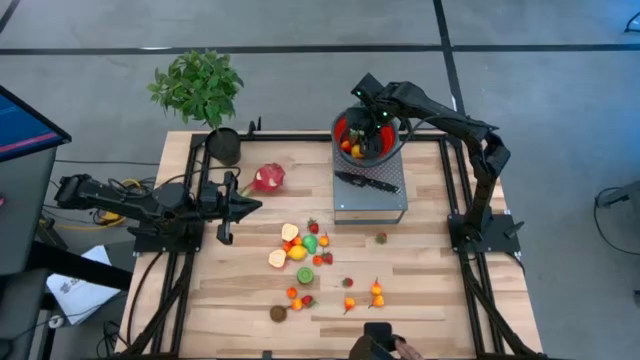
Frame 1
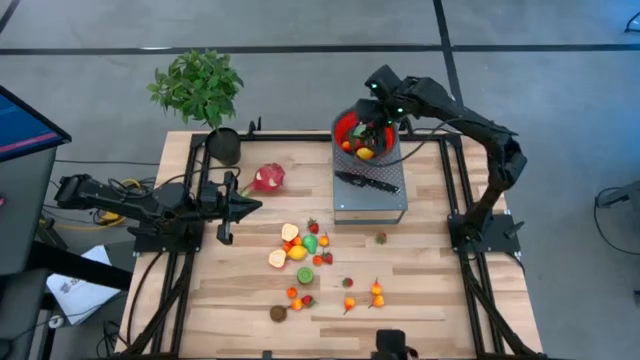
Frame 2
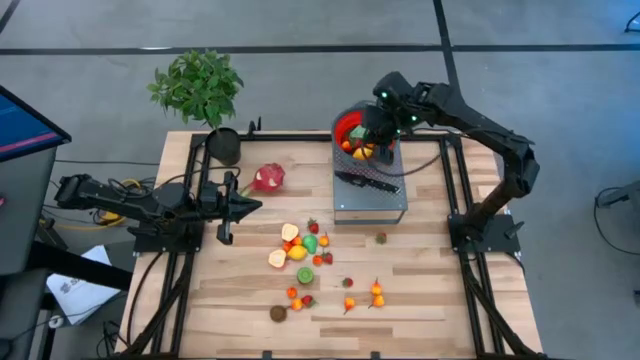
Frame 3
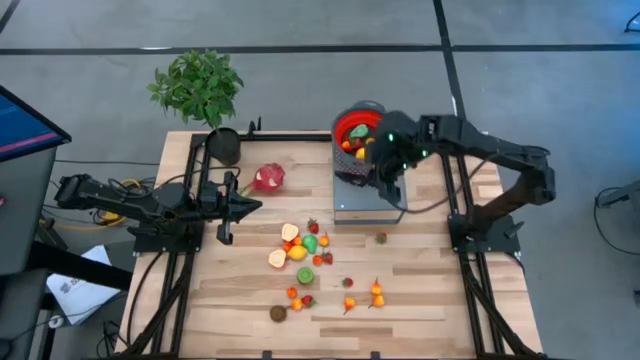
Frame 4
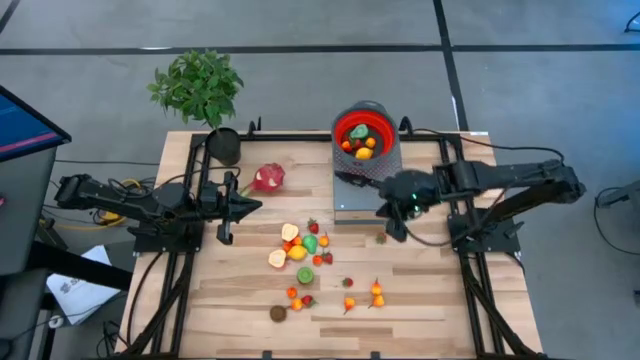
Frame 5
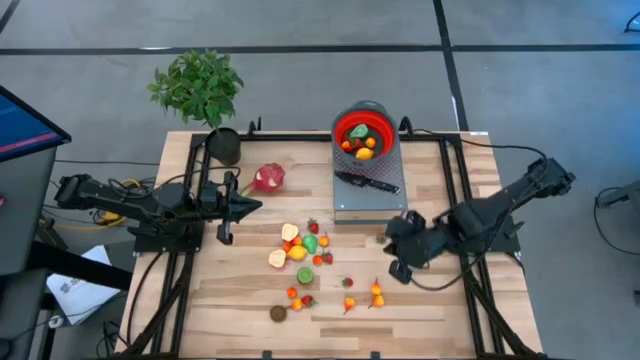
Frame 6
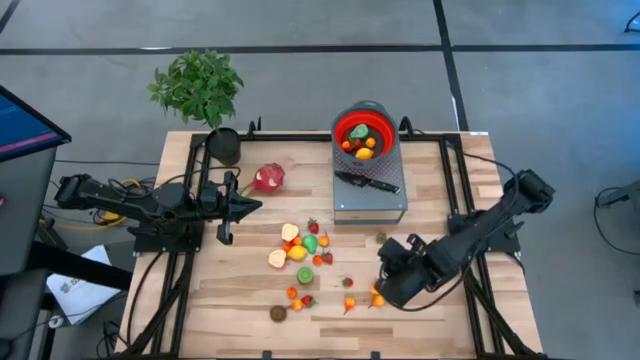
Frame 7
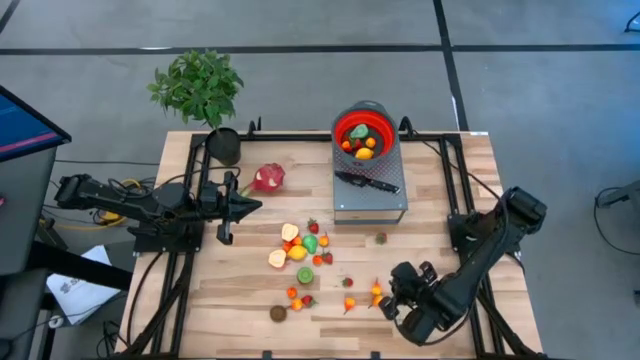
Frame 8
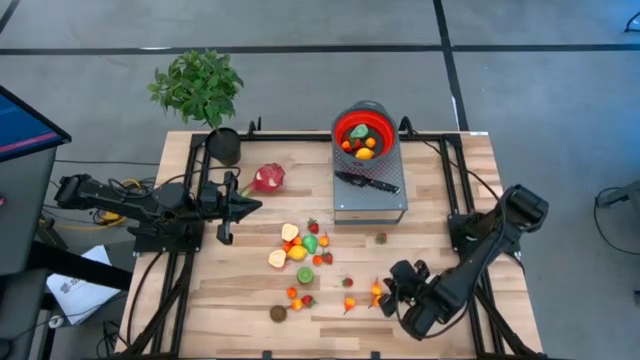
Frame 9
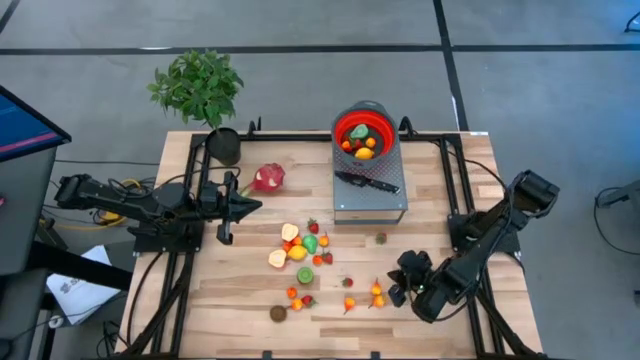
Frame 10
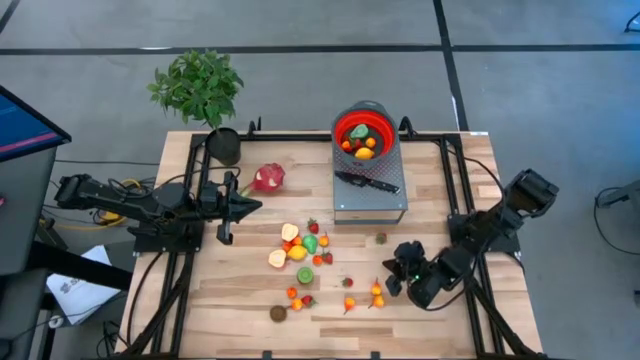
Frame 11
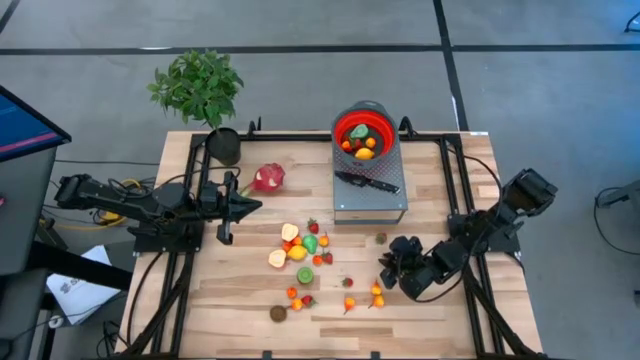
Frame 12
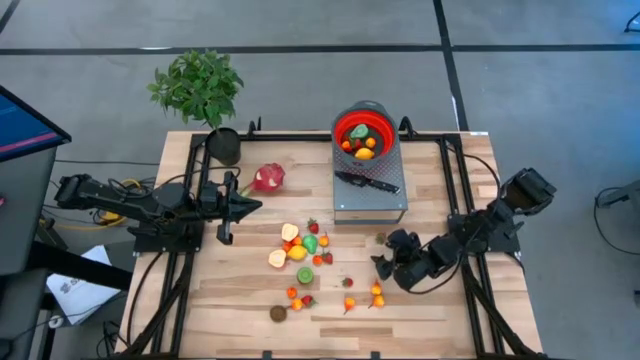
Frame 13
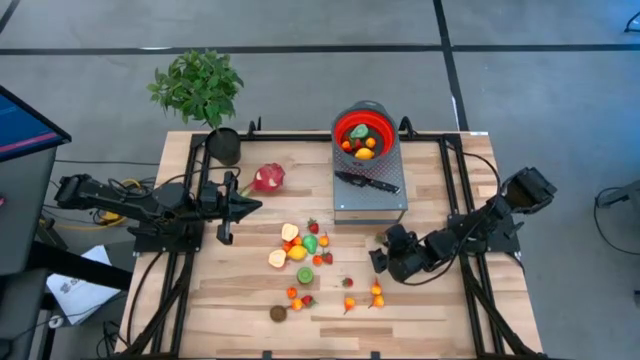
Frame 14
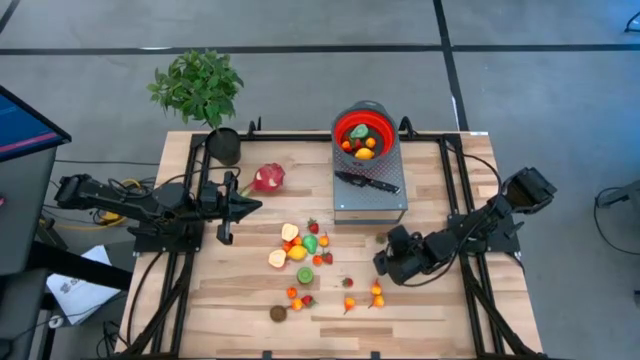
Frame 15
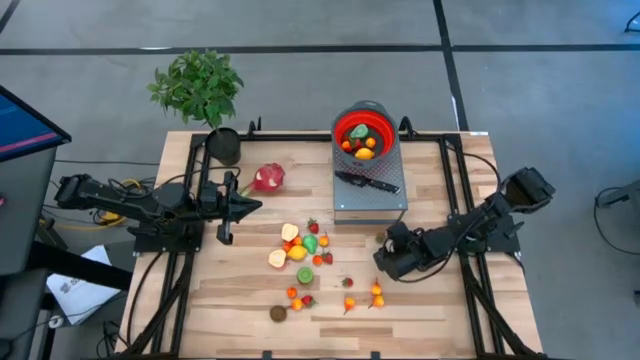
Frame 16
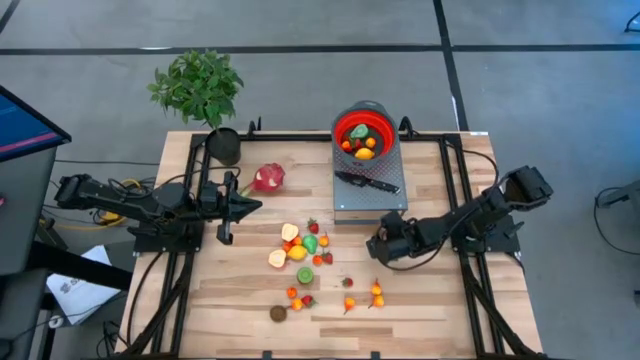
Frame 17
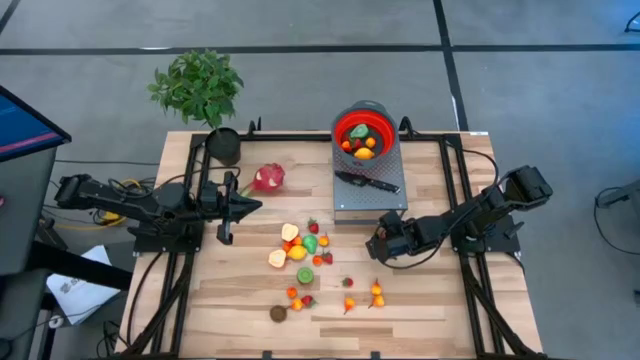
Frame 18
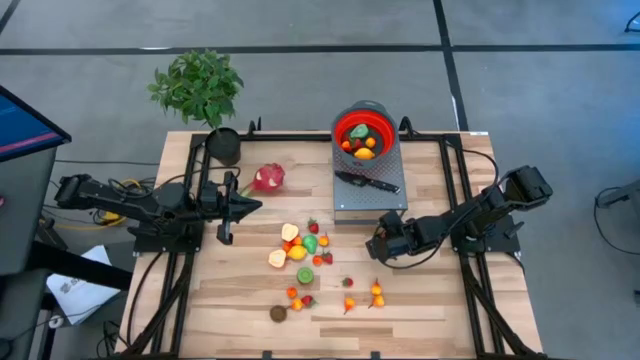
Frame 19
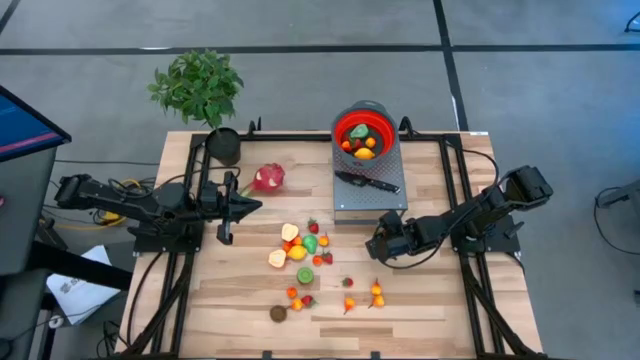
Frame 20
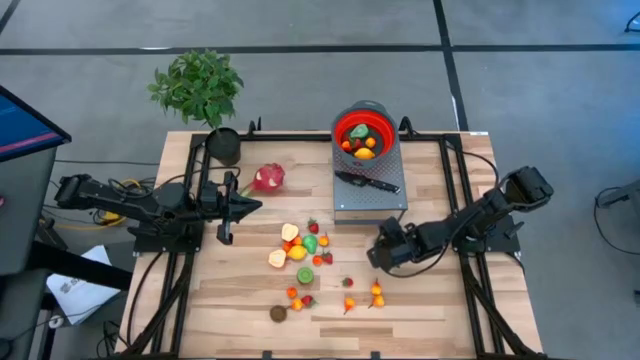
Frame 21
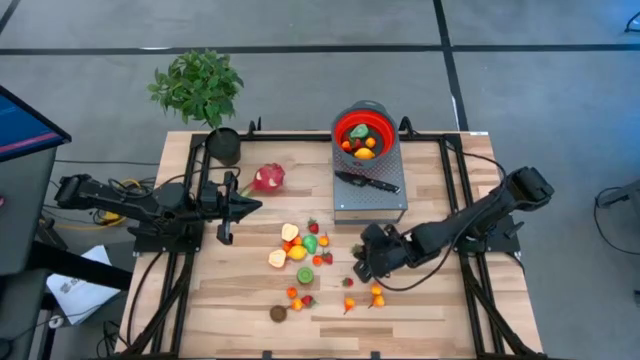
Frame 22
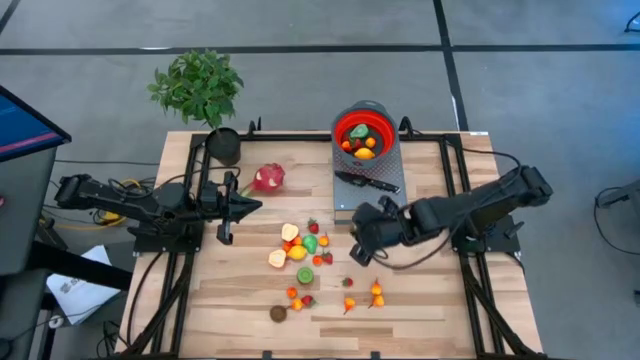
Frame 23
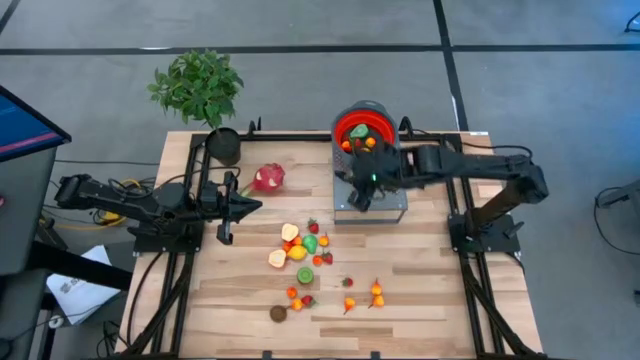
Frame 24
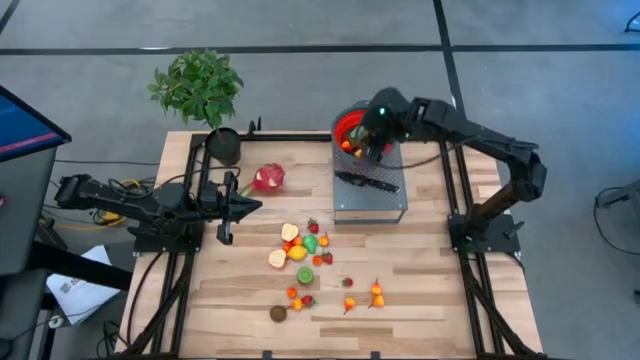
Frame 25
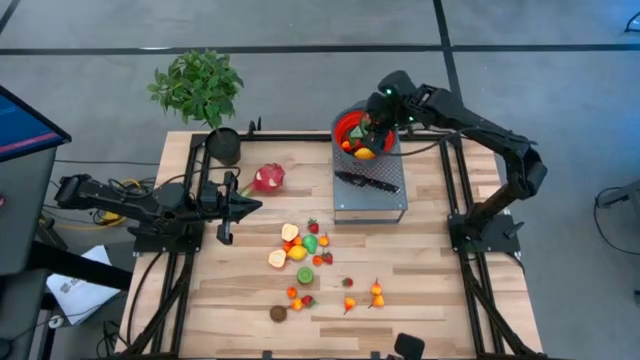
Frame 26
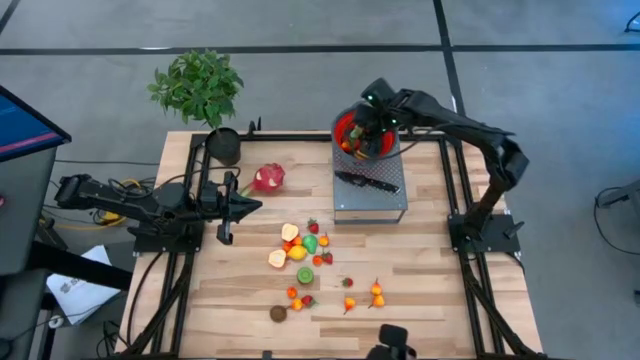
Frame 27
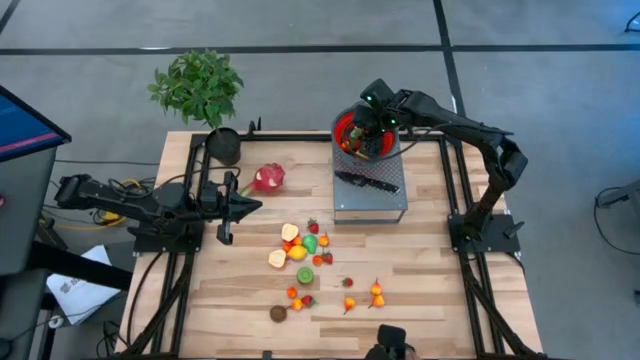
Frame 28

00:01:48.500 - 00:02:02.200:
Task: Pick & Place Fruit
Put the strawberry into the red colander on the shelf

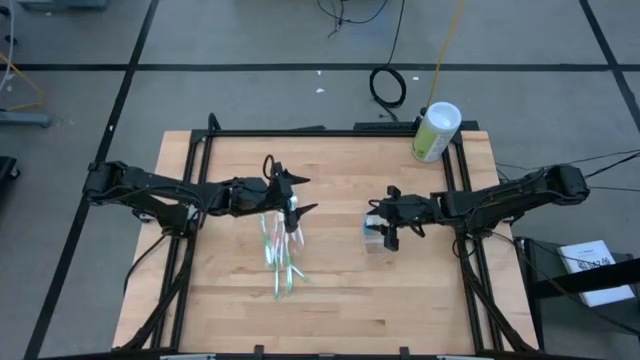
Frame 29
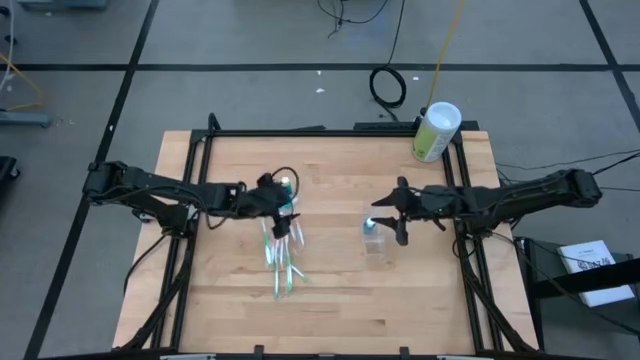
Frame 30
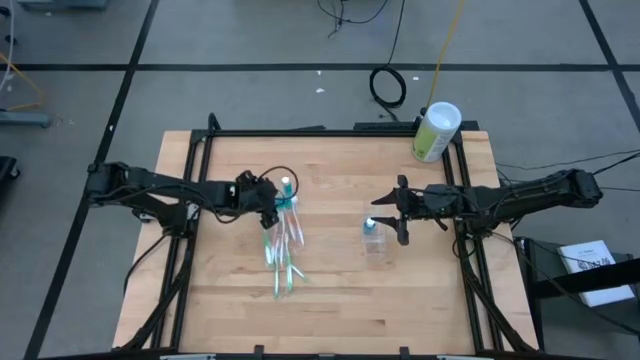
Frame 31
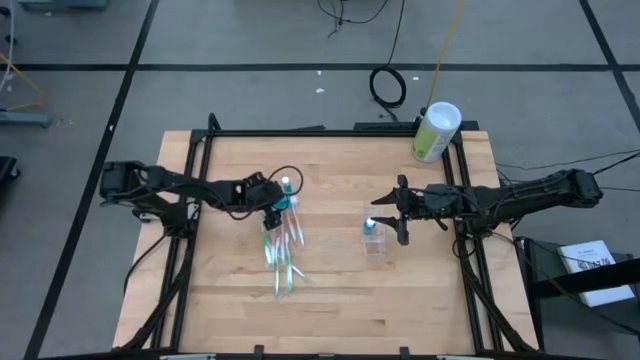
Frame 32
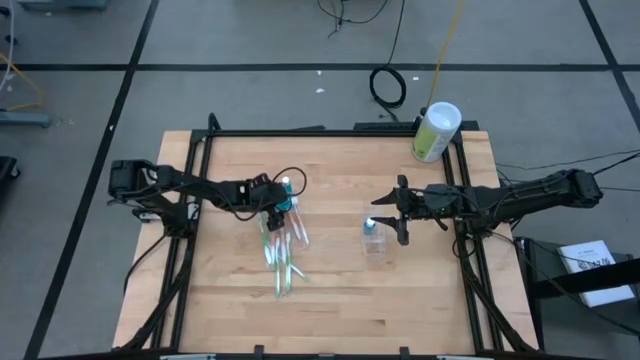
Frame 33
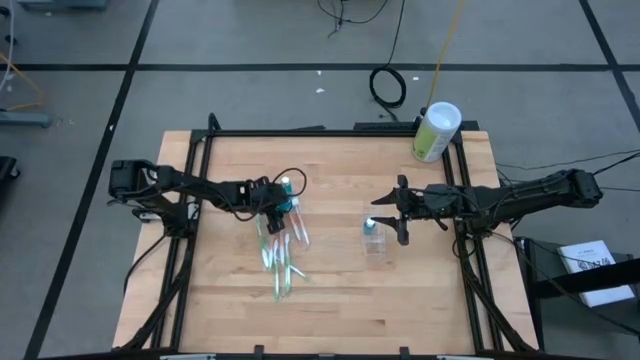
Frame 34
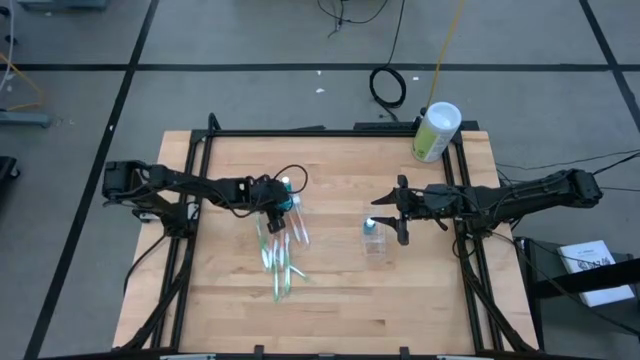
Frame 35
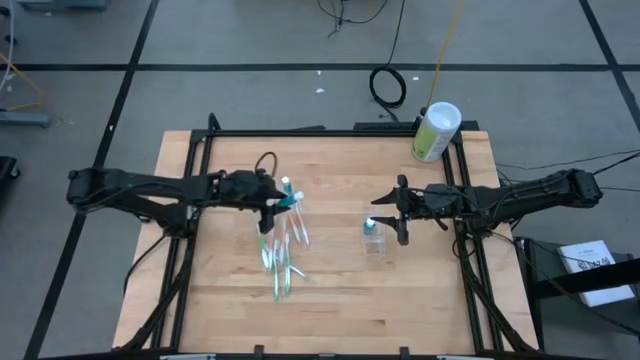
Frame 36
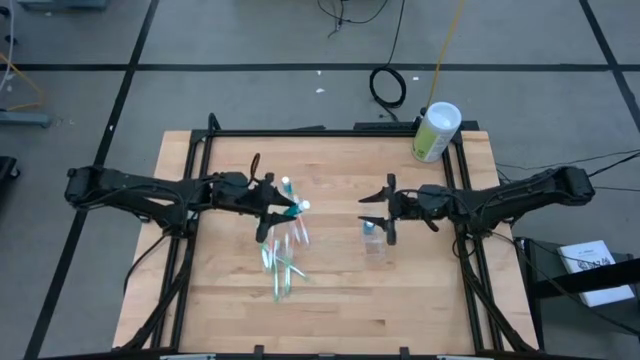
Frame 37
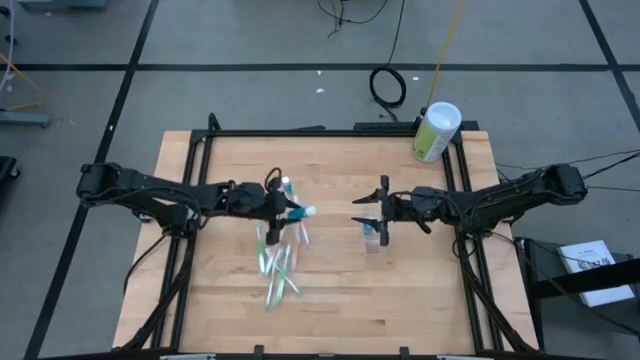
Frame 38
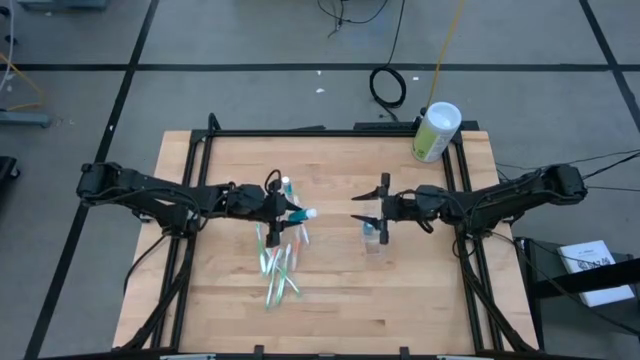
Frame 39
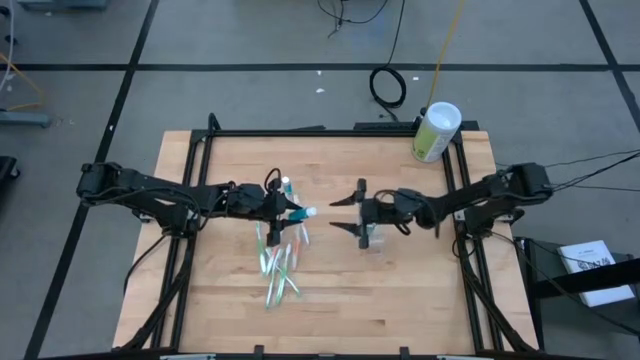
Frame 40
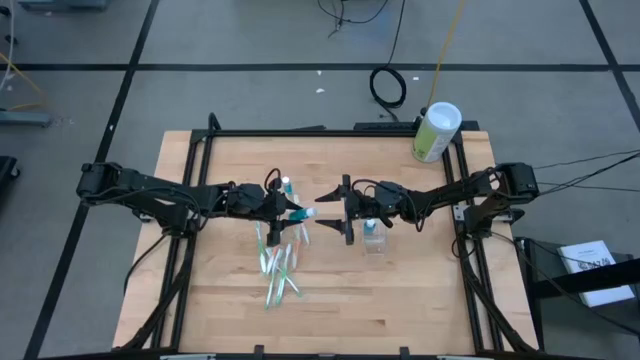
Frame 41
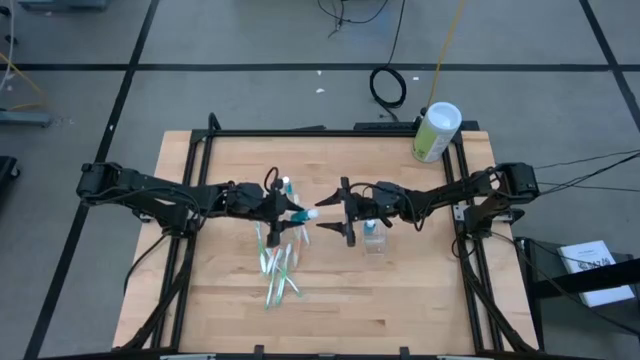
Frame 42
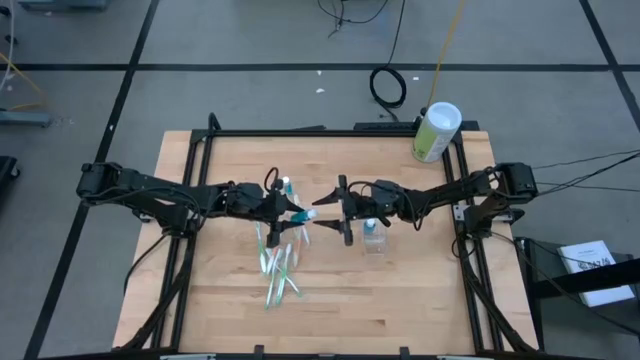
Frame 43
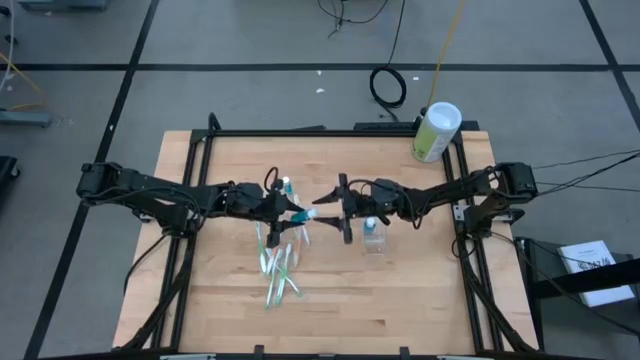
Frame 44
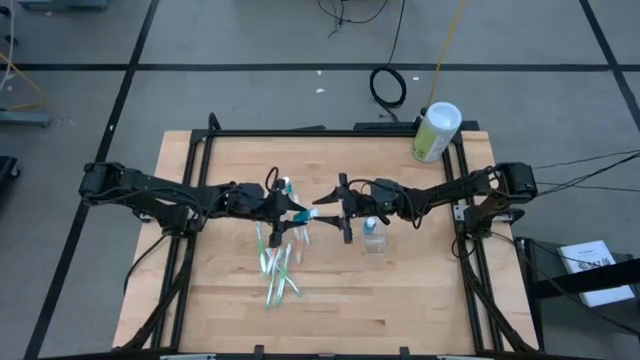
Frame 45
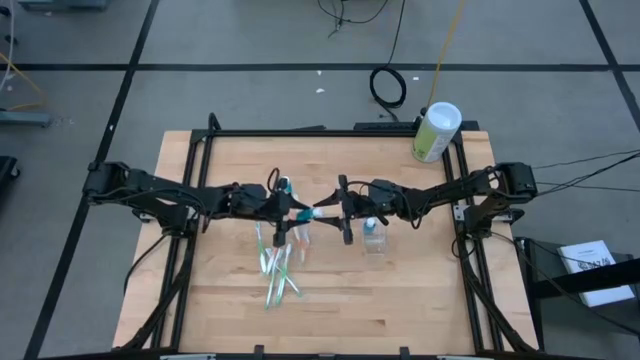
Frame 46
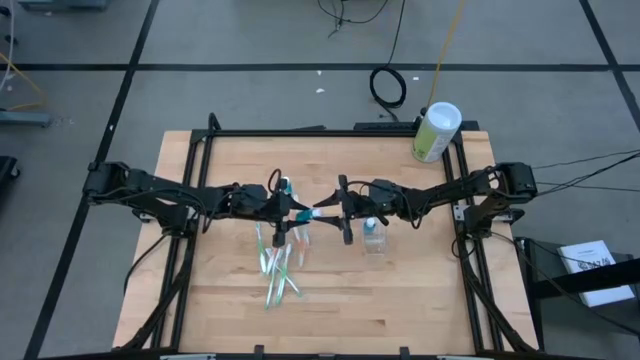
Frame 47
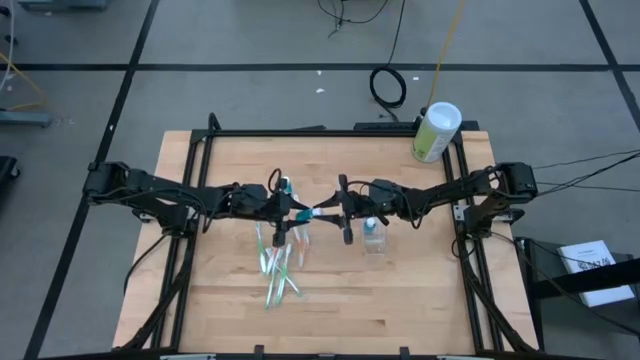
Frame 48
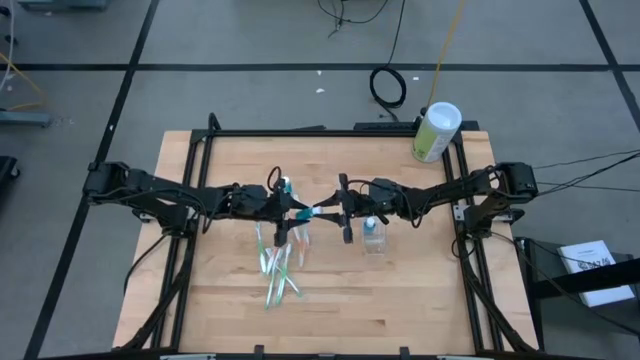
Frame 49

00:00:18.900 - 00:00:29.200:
Task: Pick & Place toothbrushing station
Put the blue mouthwash into the middle of the transparent organizer
